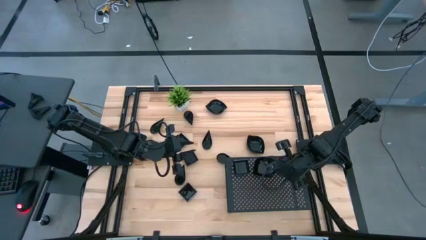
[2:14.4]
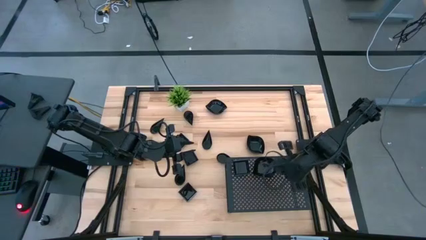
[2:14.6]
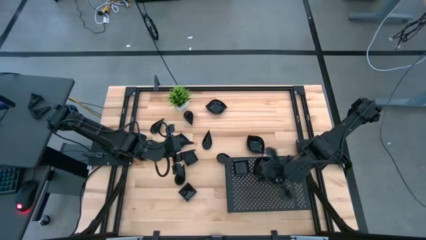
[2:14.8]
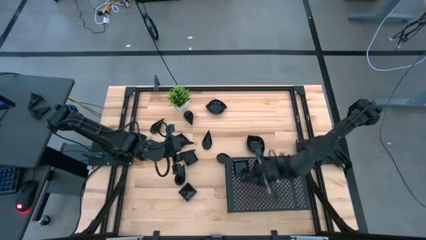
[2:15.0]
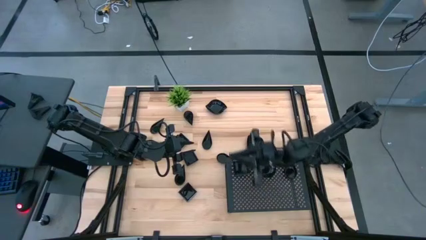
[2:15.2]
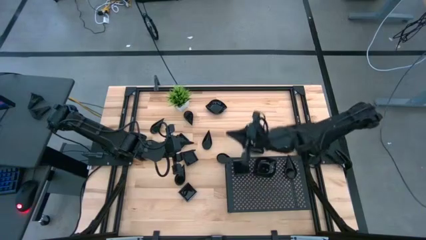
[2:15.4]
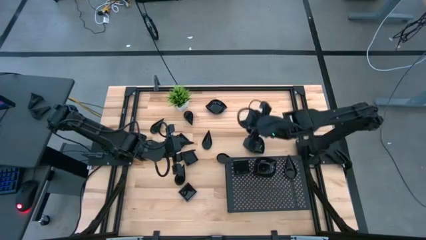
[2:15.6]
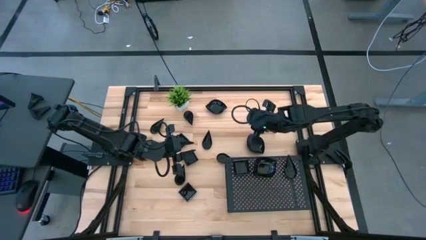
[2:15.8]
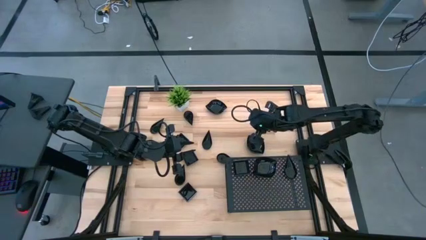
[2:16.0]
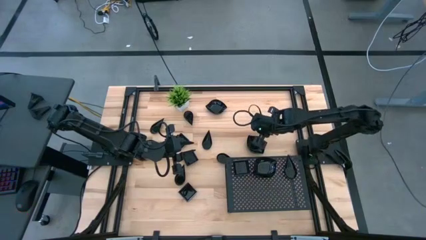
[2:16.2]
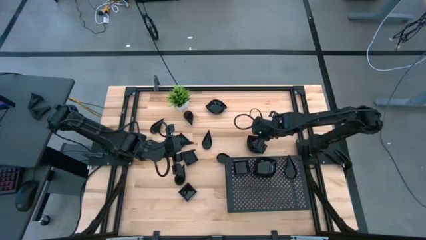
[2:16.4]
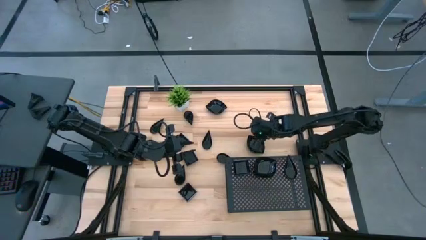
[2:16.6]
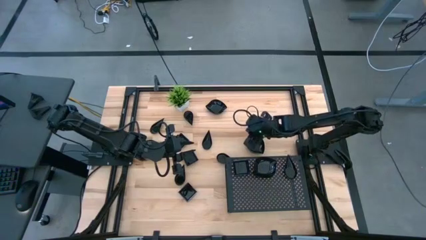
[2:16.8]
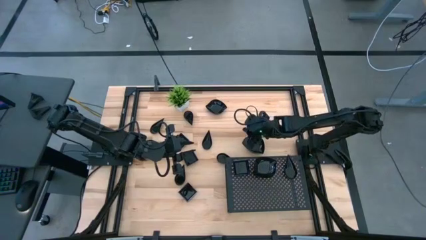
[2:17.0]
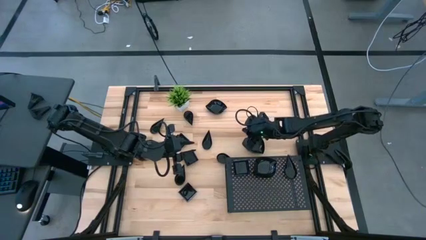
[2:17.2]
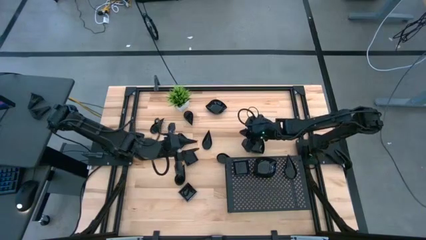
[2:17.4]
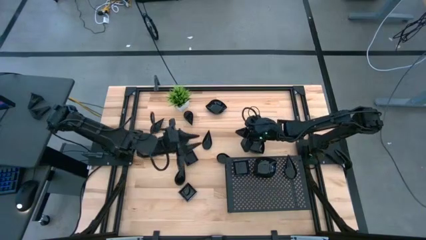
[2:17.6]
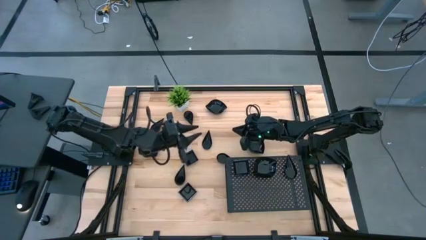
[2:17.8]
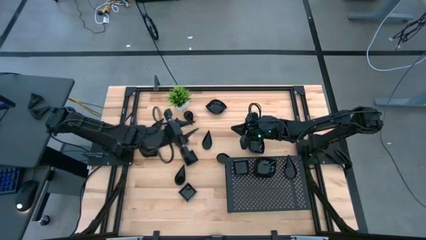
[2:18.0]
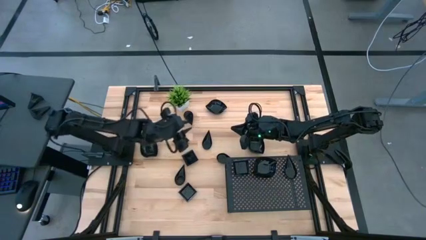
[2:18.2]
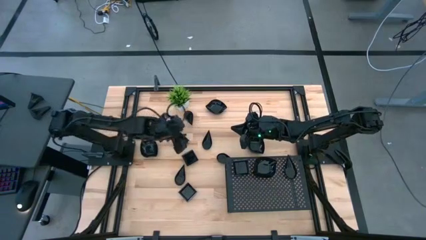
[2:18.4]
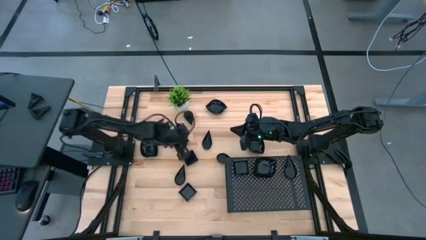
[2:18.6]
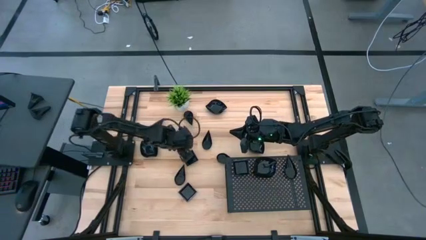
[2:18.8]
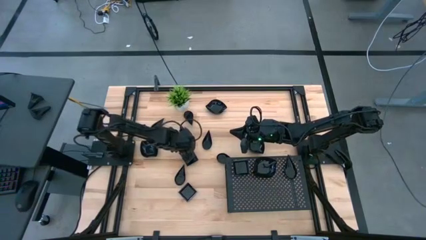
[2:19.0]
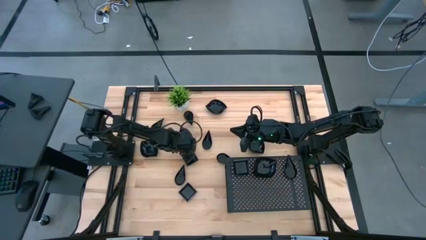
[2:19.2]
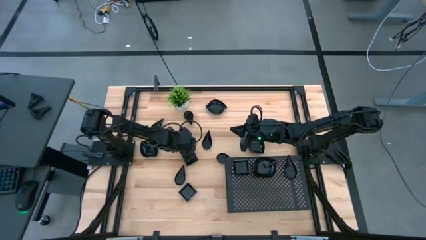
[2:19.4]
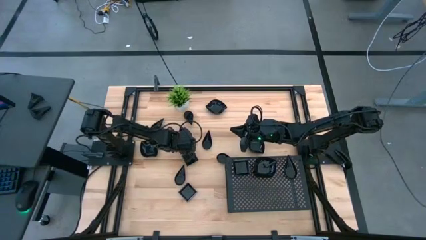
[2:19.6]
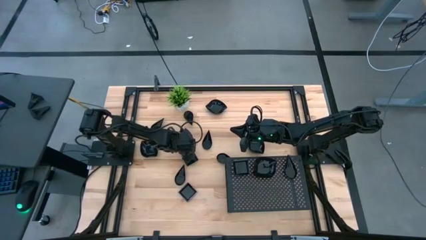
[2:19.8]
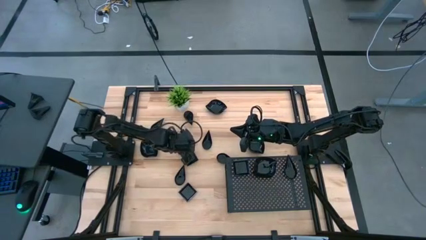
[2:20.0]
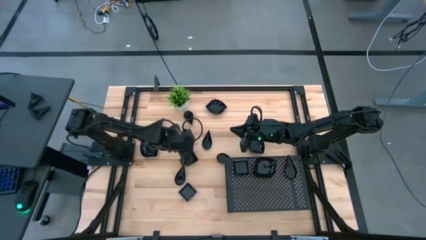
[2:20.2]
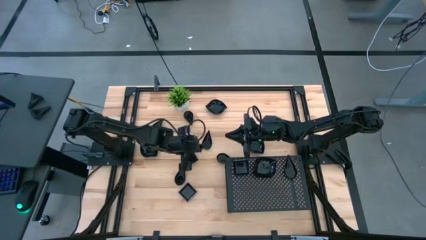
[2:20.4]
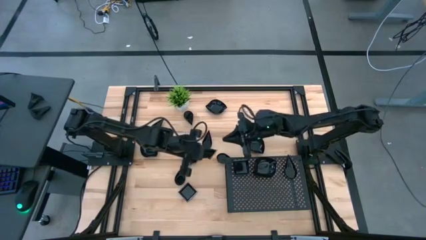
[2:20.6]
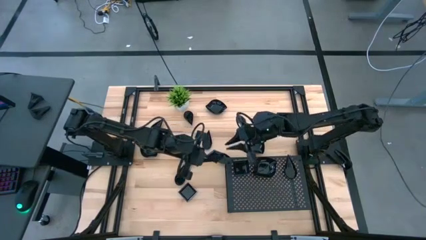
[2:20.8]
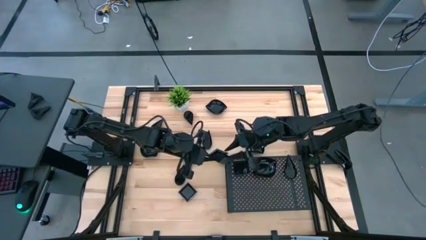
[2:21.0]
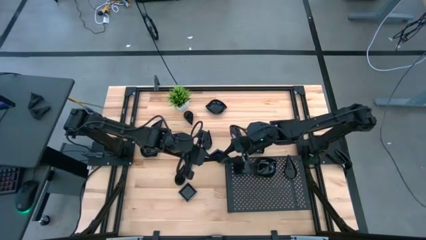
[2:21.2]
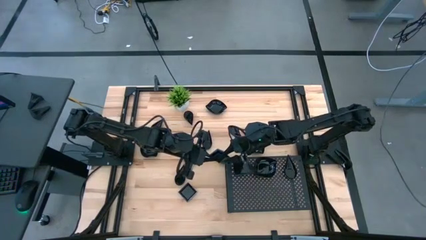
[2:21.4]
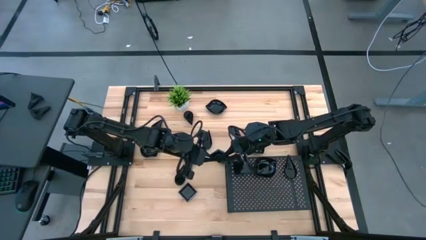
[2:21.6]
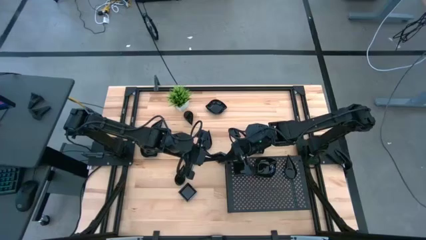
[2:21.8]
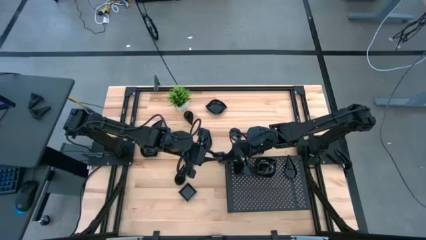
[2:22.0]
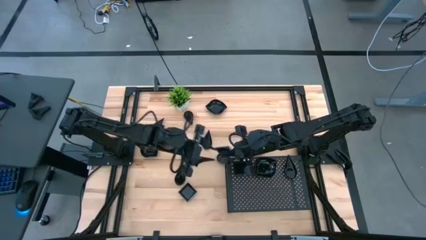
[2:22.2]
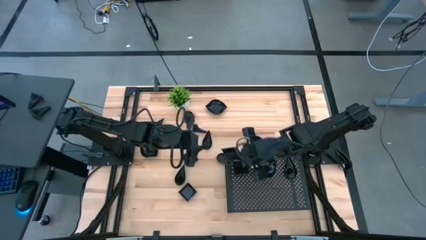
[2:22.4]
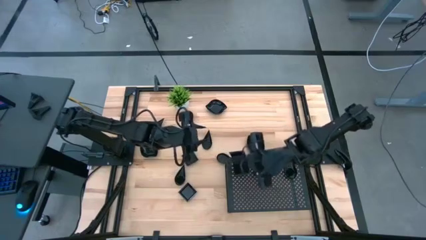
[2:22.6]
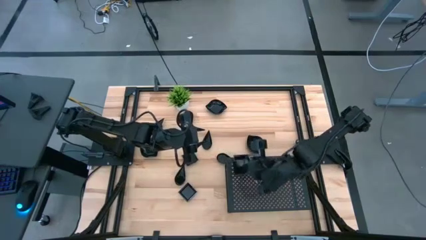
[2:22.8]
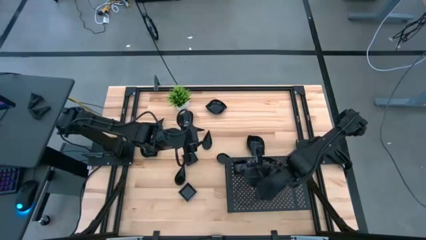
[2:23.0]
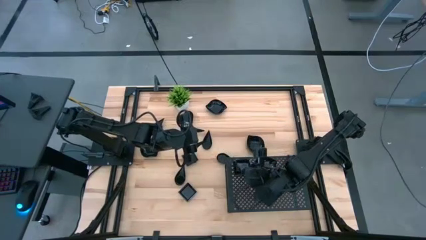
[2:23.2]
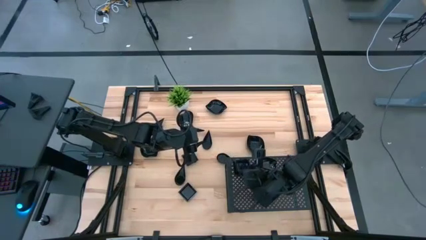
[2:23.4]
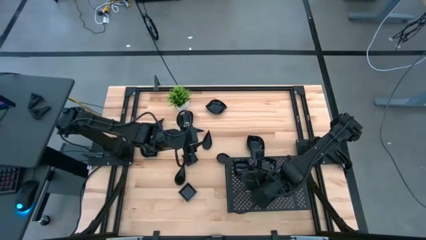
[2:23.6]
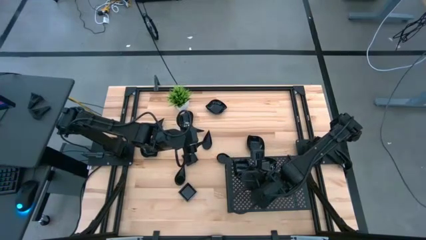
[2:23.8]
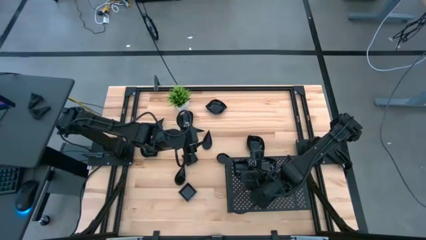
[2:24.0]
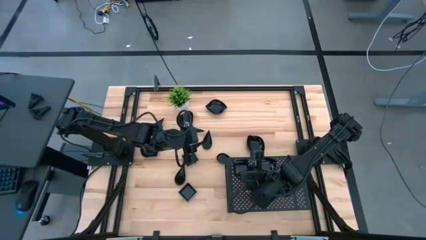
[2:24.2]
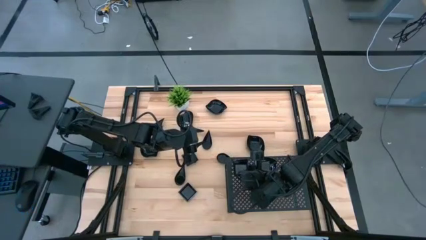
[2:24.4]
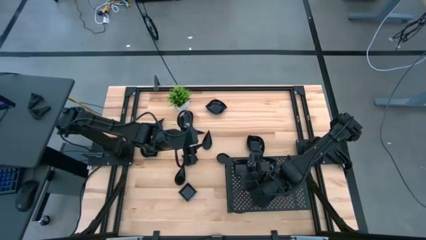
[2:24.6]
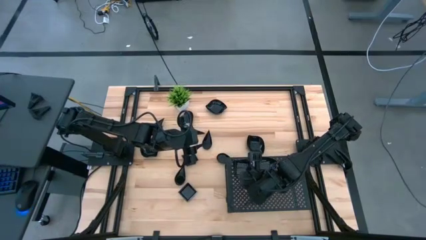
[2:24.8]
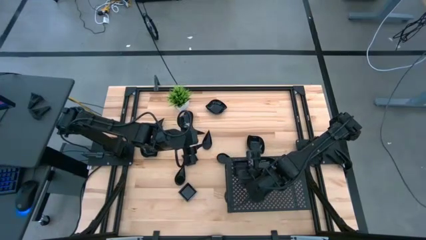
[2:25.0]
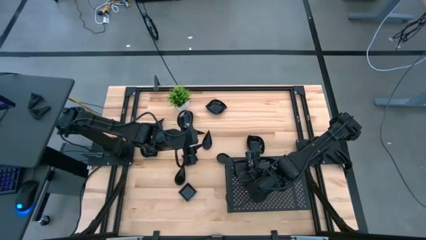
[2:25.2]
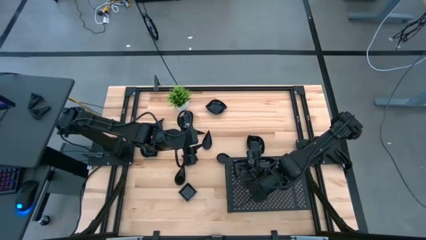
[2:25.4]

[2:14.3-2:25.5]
Task: Pick & Place Mini shaped plates
Stack the square plate on top of the square plate on the shelf

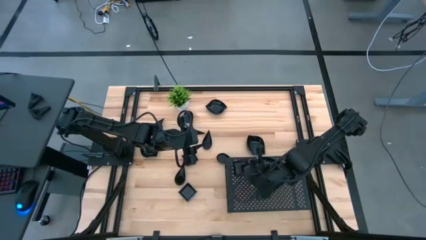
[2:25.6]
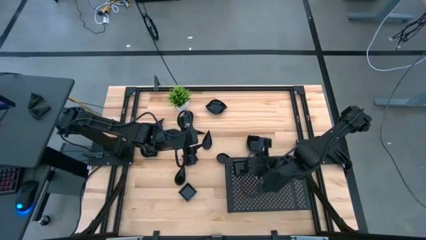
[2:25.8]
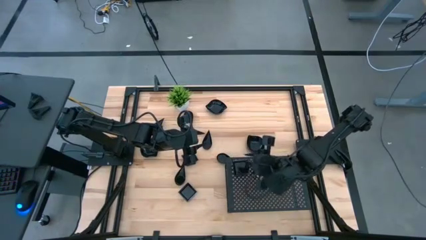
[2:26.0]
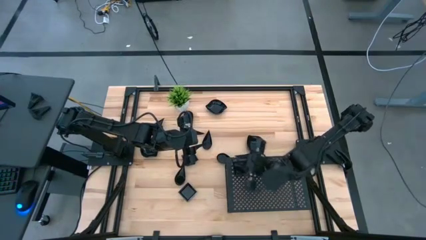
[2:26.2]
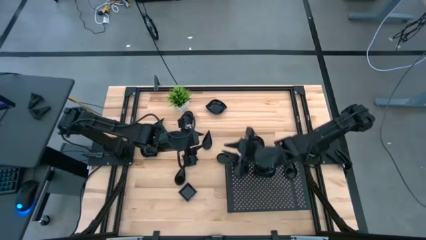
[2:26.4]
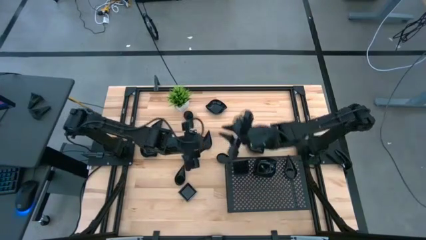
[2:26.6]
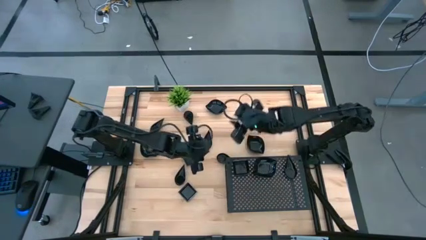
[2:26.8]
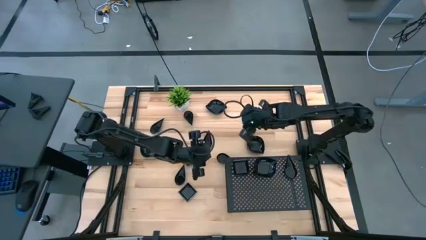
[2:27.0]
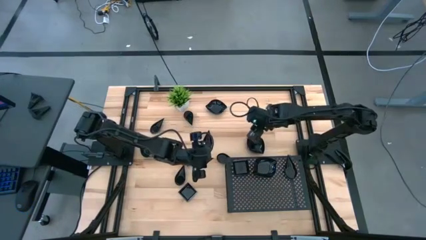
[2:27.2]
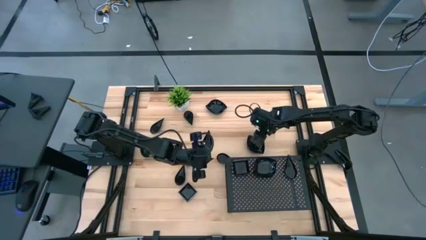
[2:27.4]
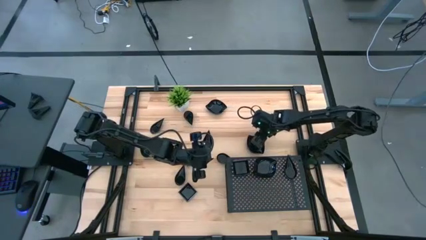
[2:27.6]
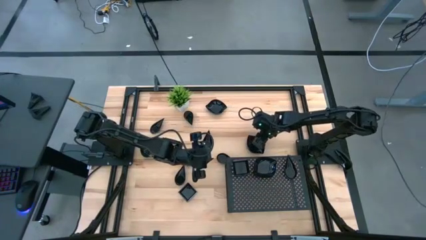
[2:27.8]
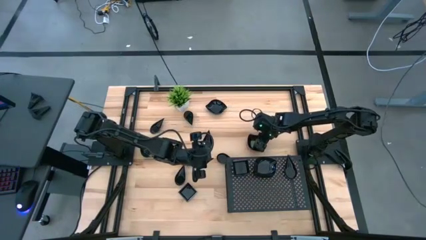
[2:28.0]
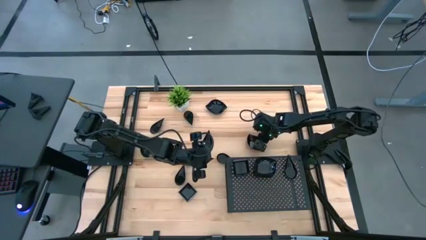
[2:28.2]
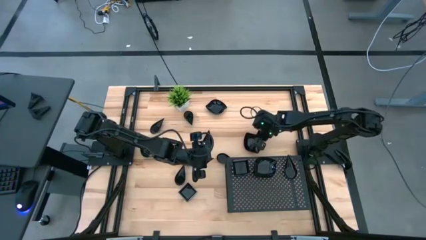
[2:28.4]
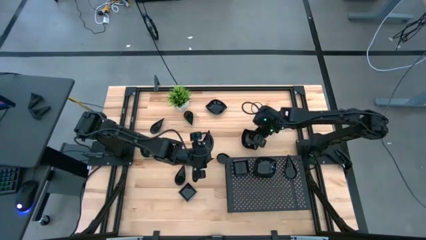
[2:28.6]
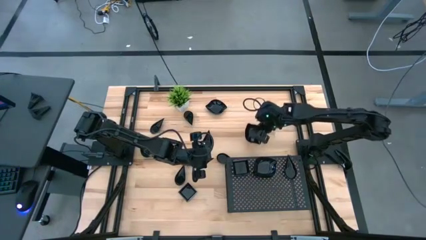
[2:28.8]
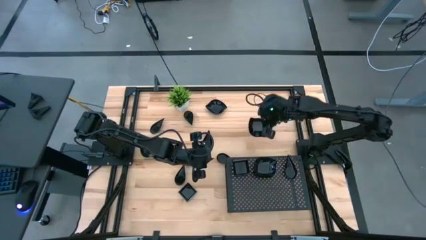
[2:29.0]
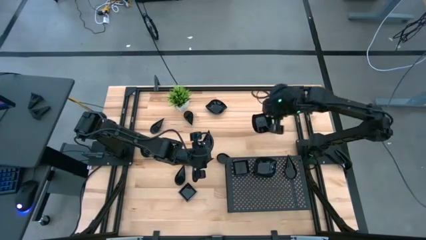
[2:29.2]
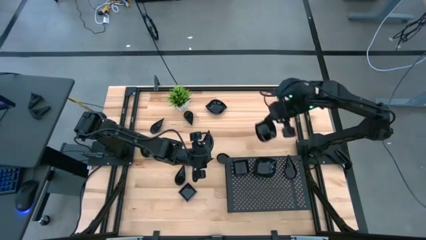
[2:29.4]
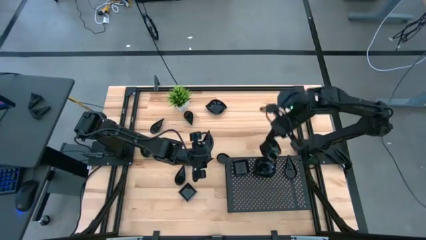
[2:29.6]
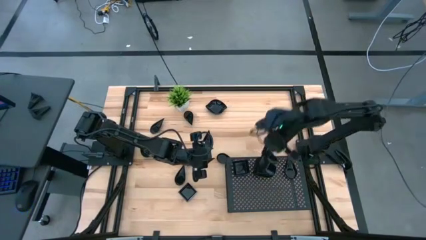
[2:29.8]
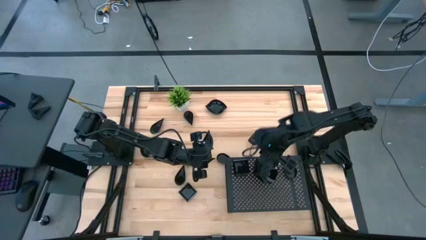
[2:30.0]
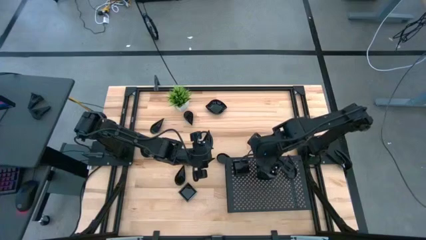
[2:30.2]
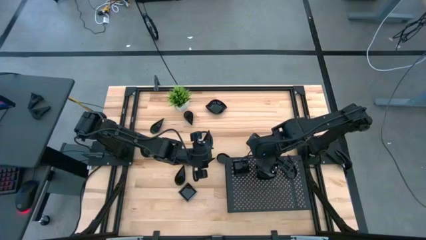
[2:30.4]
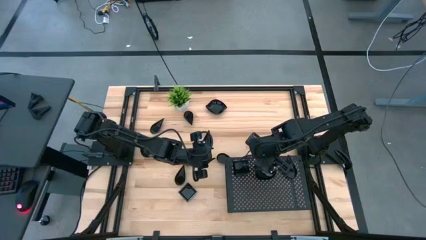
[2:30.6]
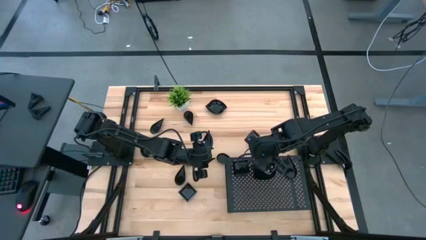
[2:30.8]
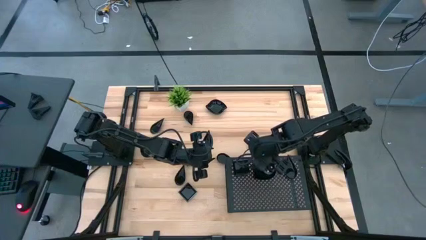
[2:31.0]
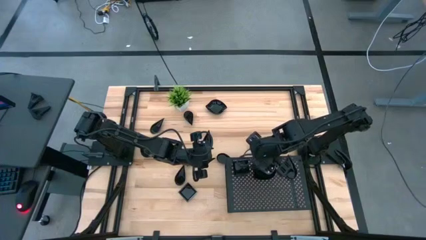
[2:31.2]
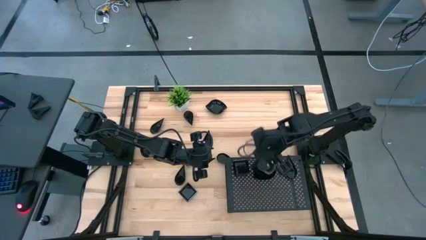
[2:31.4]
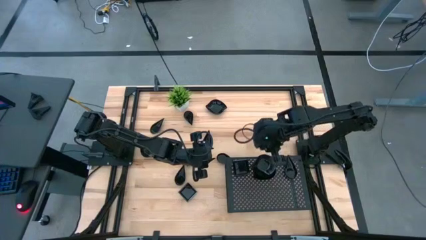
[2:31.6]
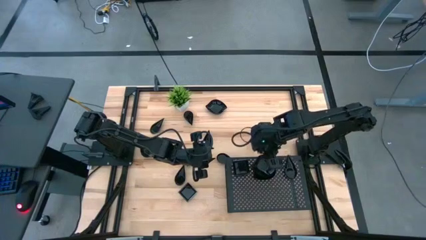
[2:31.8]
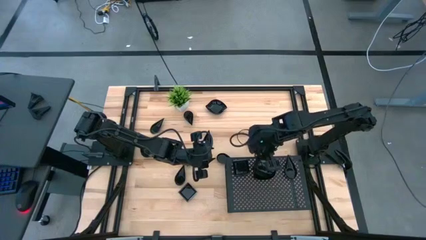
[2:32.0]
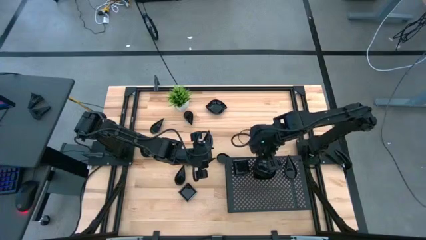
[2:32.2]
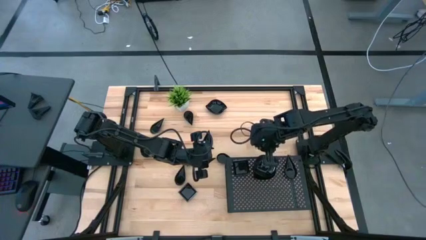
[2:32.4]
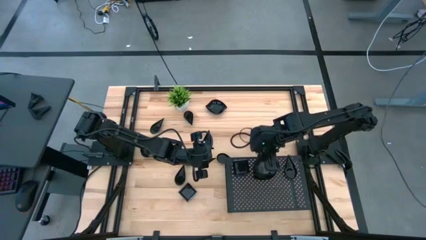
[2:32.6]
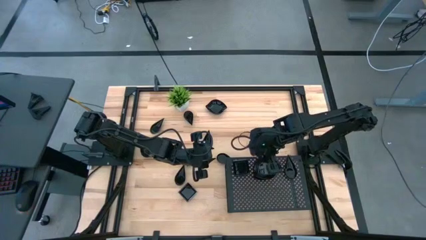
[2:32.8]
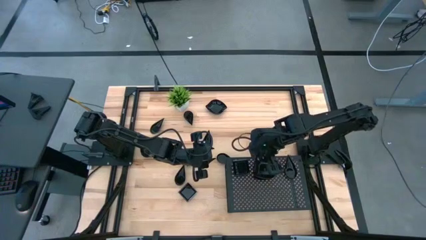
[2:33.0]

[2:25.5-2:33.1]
Stack the leaf shaped plate on top of the leaf shaped plate on the shelf
